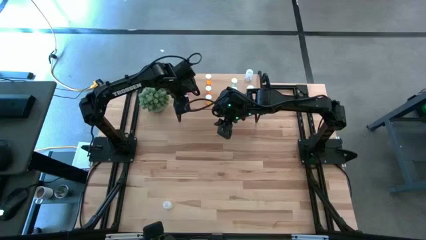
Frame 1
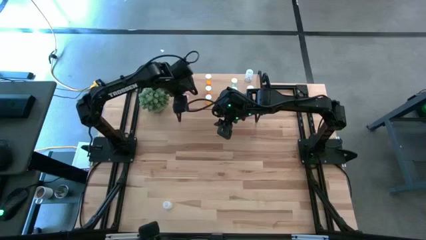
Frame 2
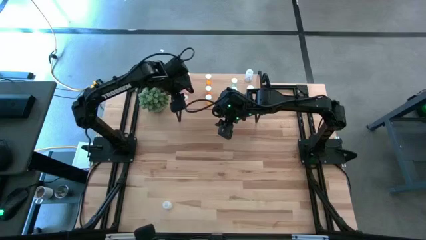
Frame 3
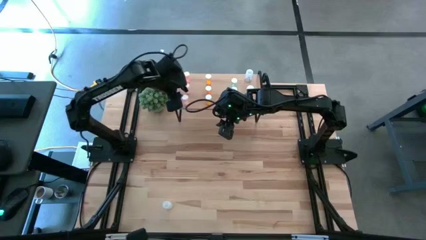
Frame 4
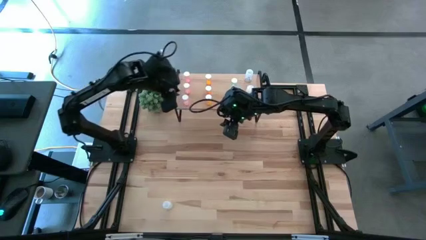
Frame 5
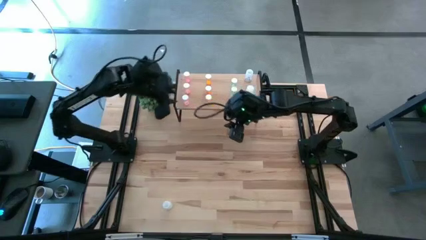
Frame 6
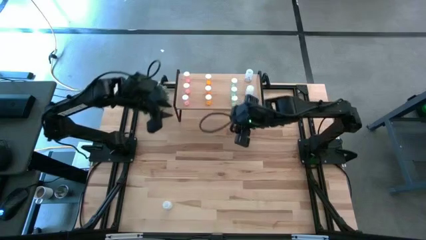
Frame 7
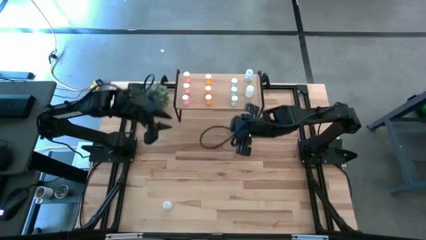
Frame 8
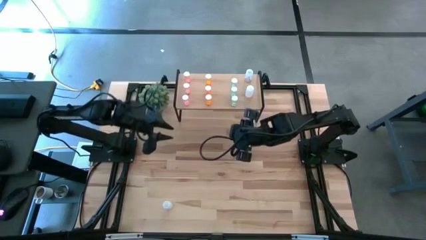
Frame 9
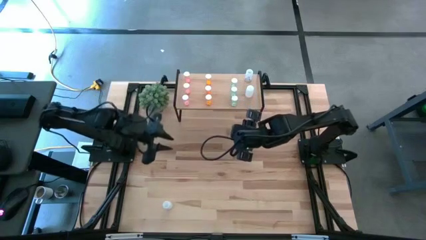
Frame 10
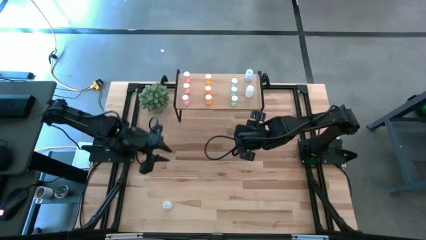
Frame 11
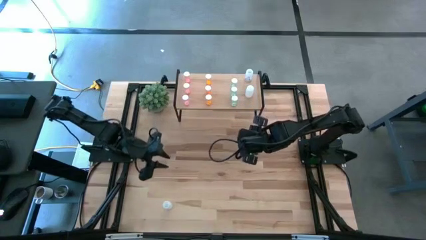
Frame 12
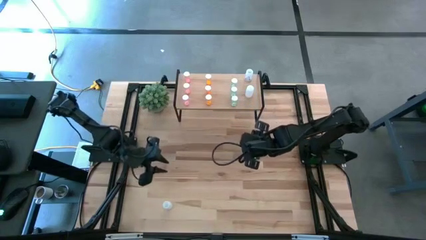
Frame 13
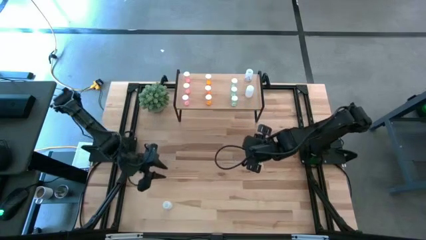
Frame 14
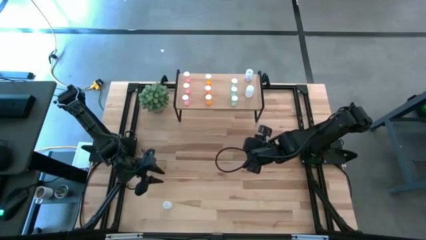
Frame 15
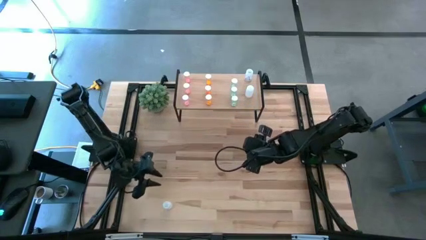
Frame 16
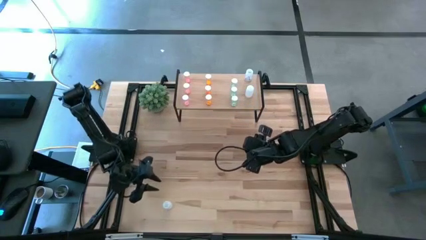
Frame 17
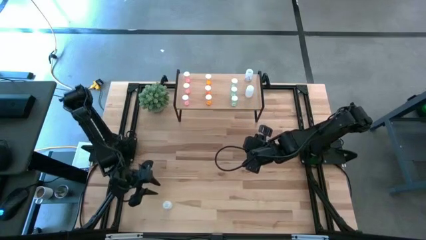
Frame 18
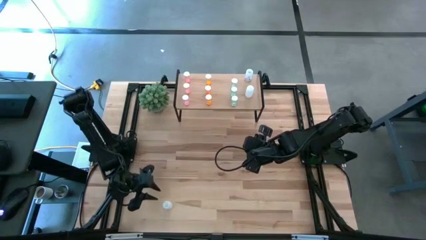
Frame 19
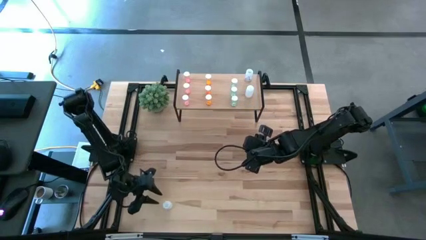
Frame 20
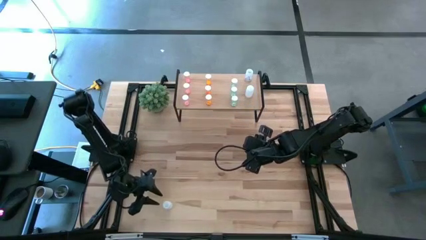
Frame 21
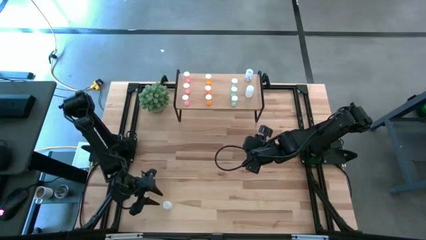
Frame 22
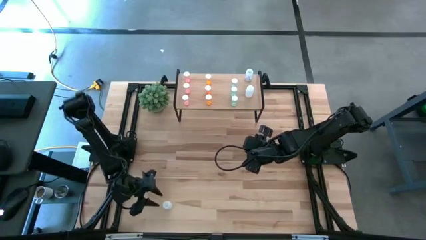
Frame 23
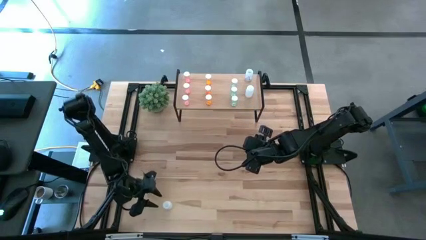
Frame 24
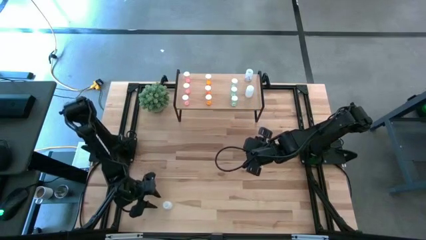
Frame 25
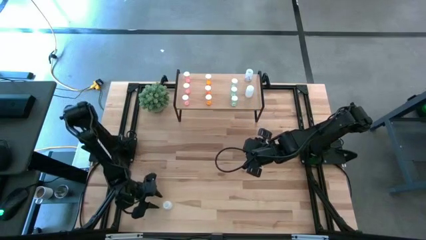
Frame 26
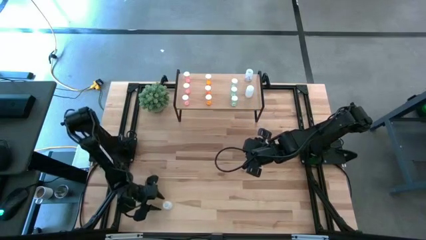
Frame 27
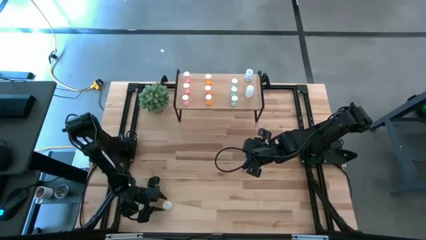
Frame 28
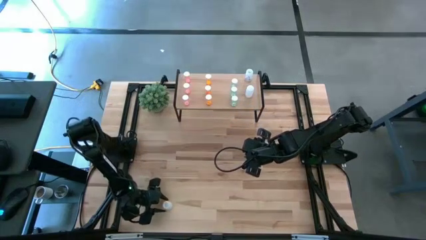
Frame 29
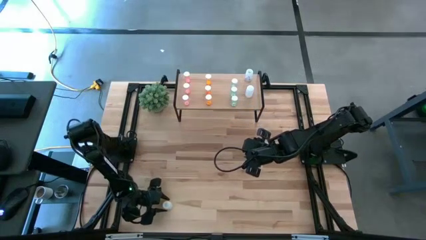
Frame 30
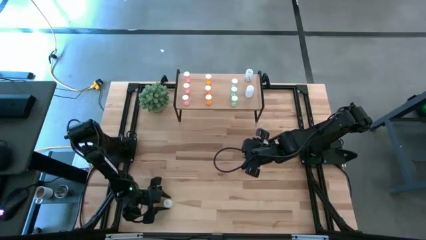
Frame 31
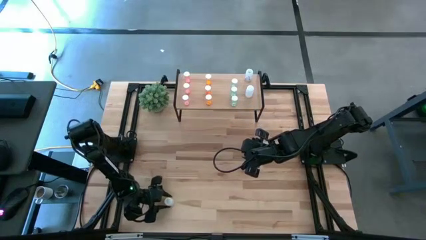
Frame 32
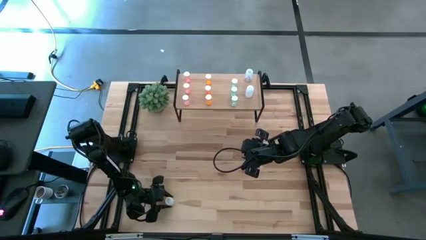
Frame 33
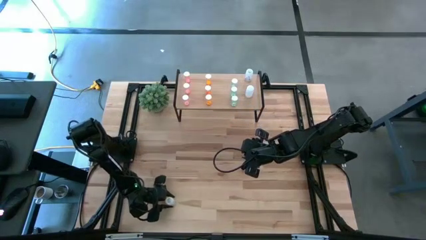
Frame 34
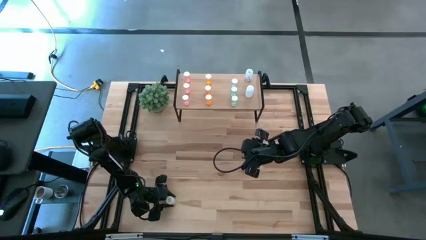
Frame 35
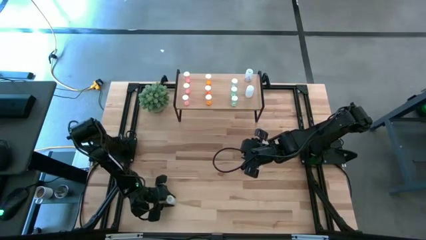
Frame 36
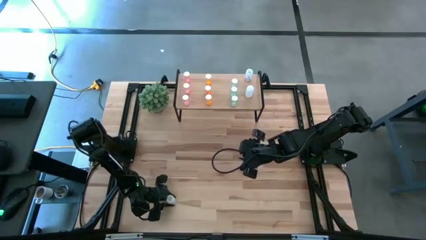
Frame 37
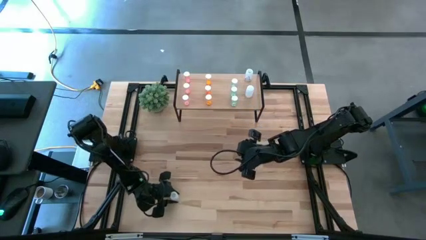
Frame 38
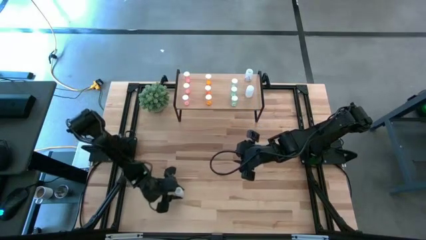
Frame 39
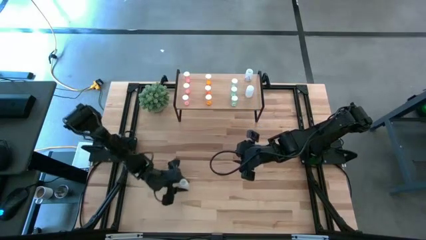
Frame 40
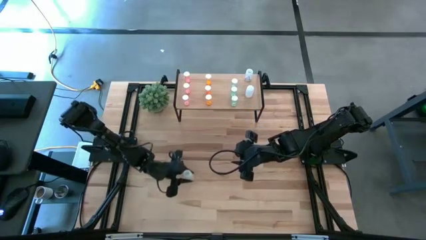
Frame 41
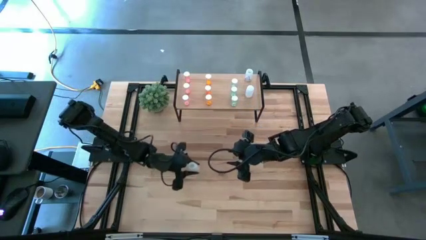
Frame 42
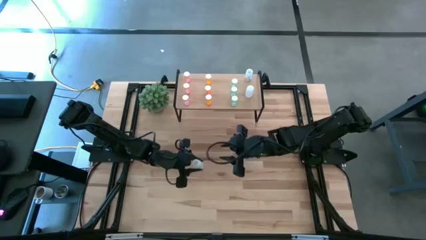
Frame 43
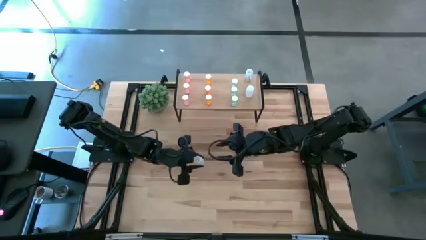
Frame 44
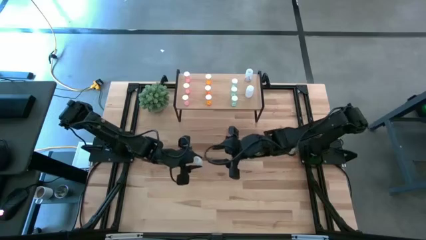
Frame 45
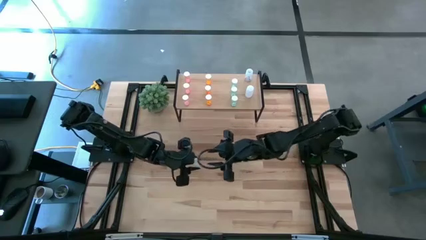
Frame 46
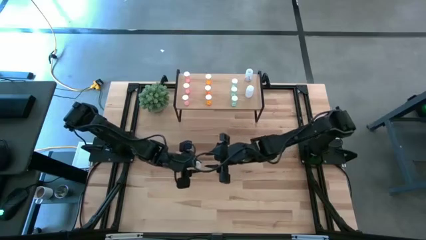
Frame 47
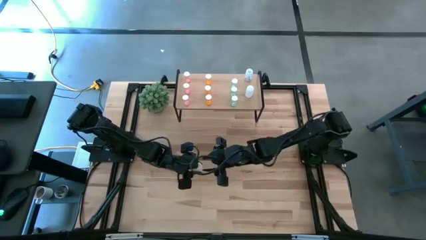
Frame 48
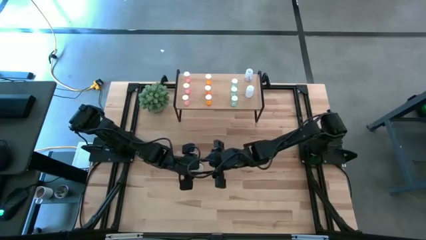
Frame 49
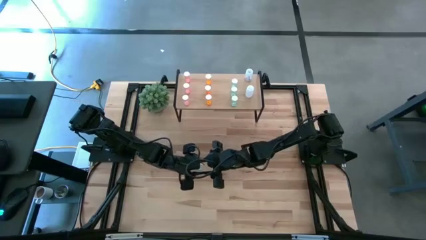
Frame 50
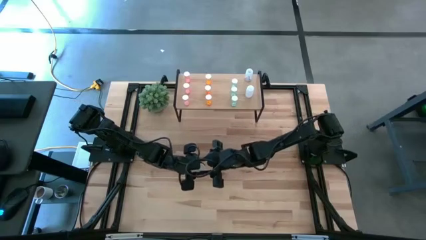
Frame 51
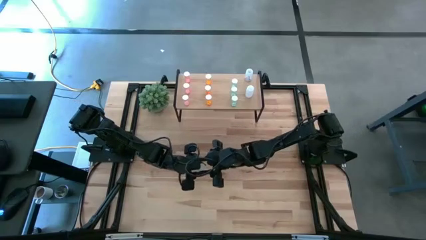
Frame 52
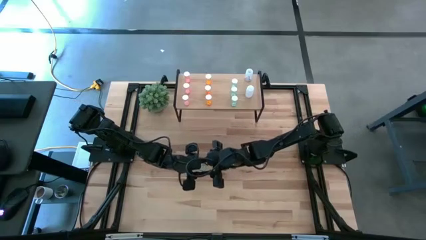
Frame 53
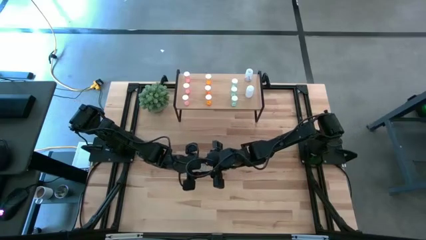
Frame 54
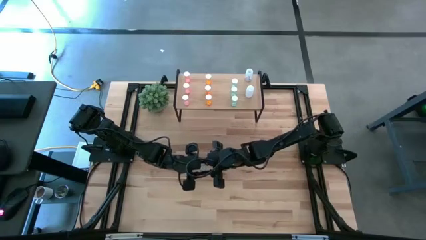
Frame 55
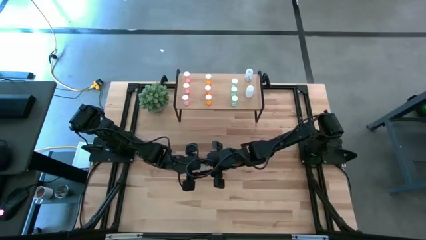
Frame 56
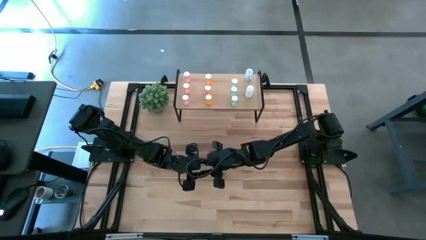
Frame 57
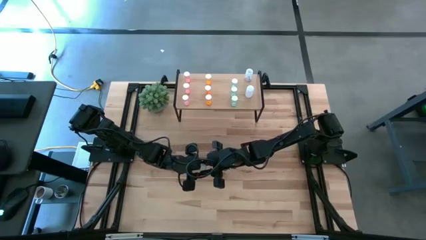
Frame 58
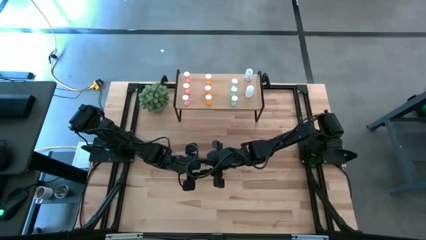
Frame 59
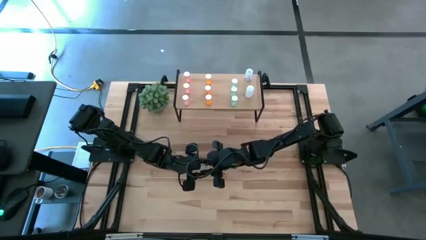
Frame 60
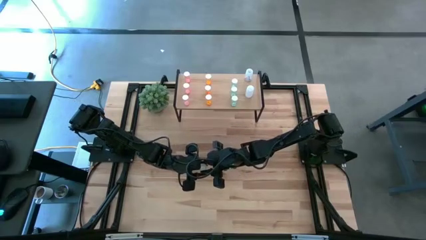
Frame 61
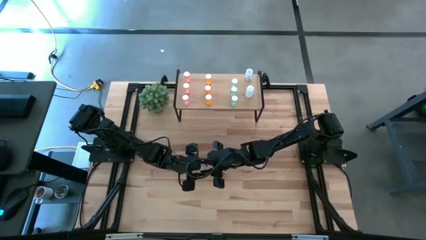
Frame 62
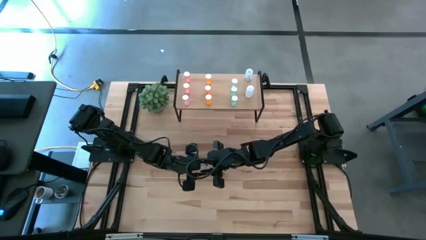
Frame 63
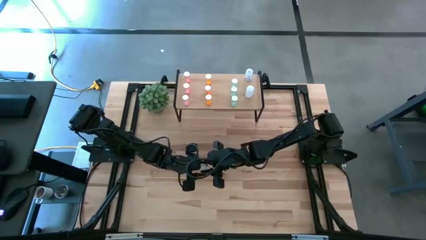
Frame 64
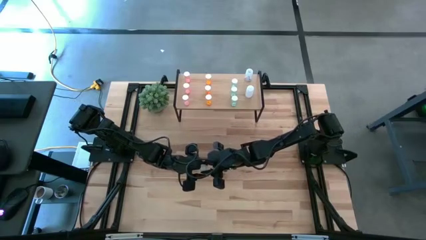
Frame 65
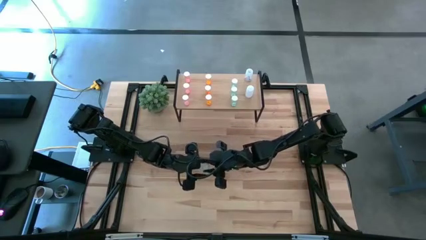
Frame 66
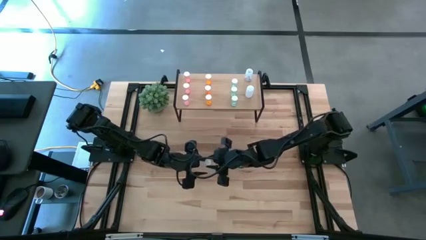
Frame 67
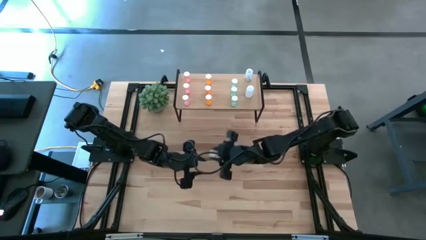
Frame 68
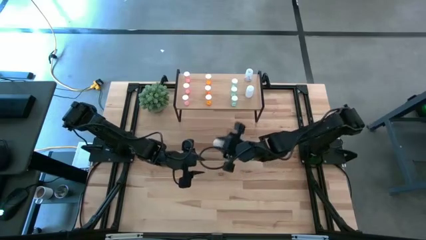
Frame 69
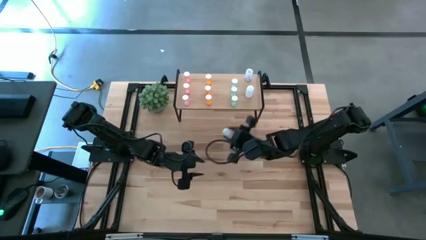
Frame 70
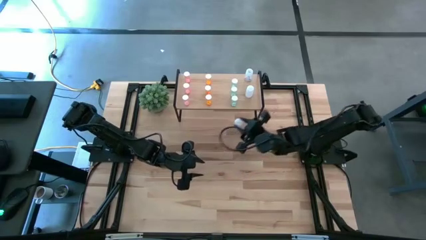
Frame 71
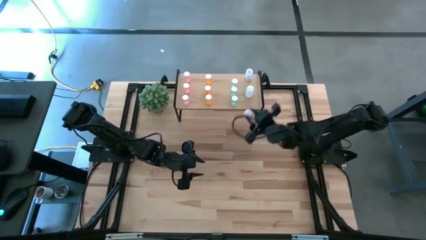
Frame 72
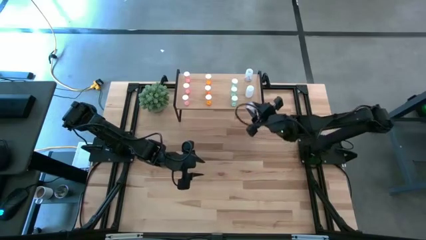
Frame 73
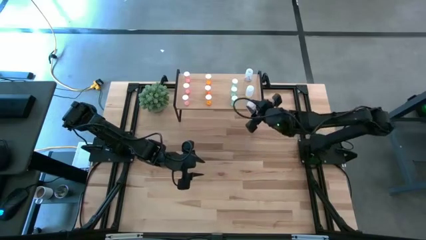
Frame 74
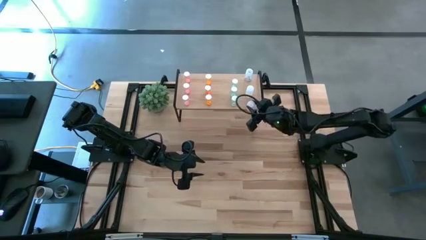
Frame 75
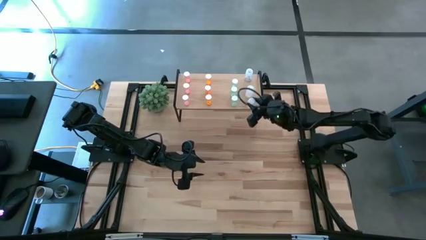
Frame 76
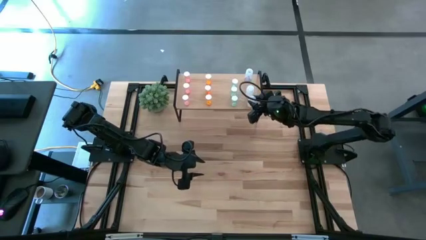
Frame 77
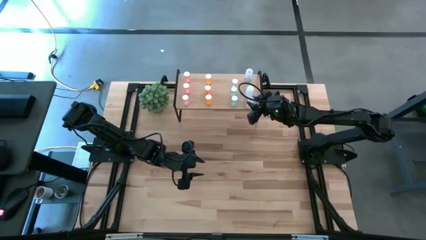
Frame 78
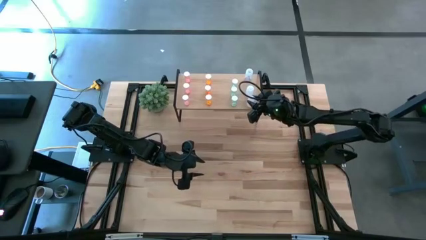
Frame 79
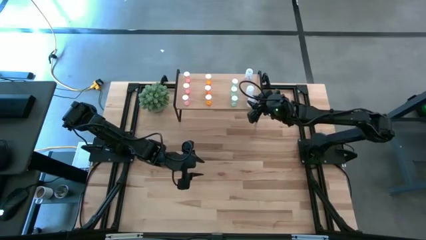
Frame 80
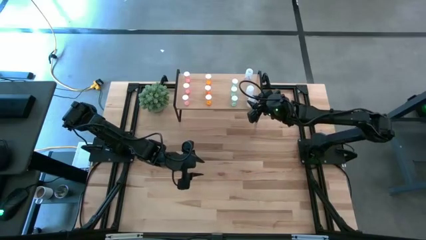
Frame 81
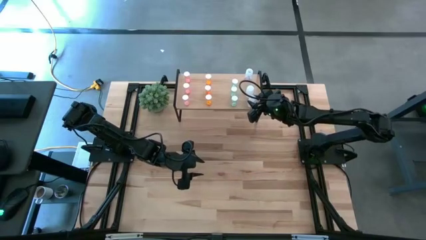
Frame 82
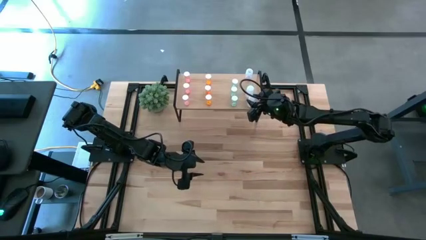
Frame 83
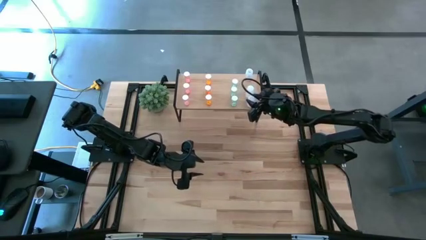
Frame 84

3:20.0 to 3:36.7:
Task: Pick and place medicine bottles onto shelf by color
Put the white pill bottle on the shelf aligned with the other white pill bottles
